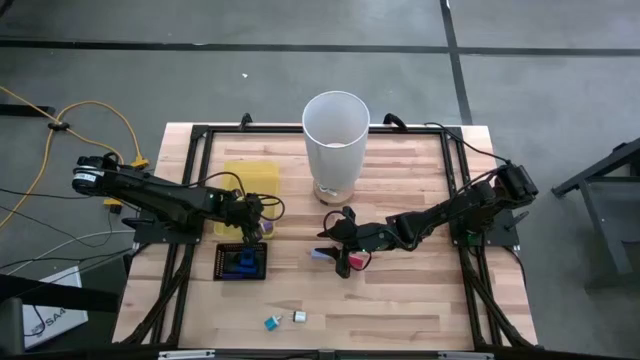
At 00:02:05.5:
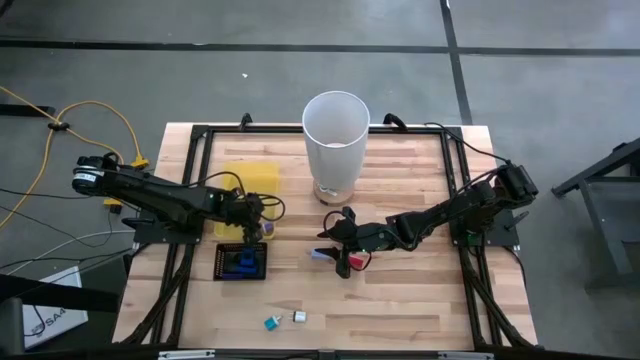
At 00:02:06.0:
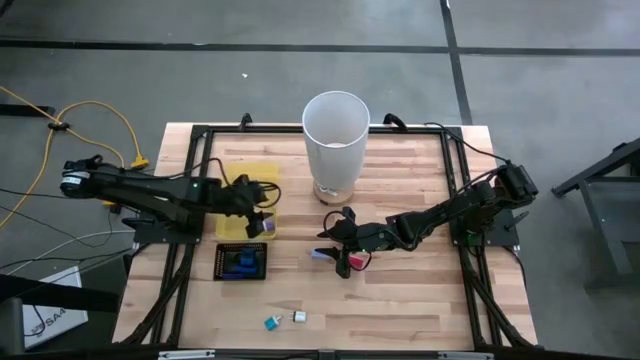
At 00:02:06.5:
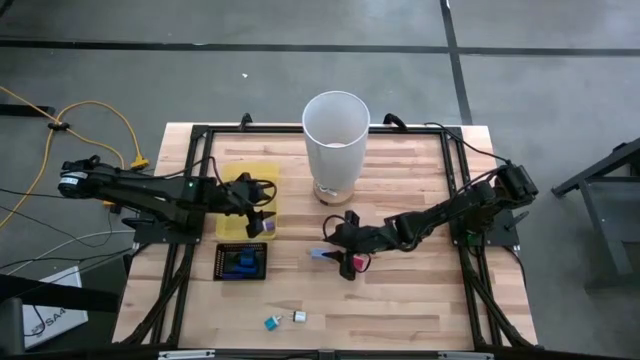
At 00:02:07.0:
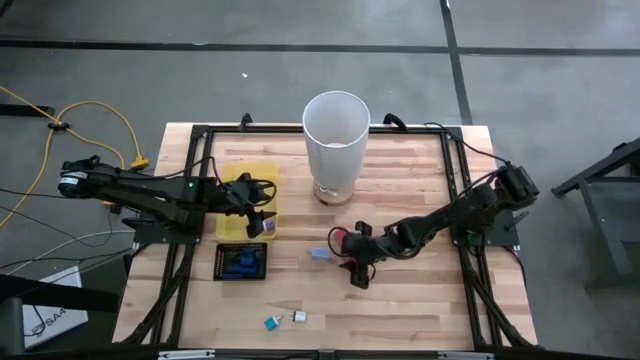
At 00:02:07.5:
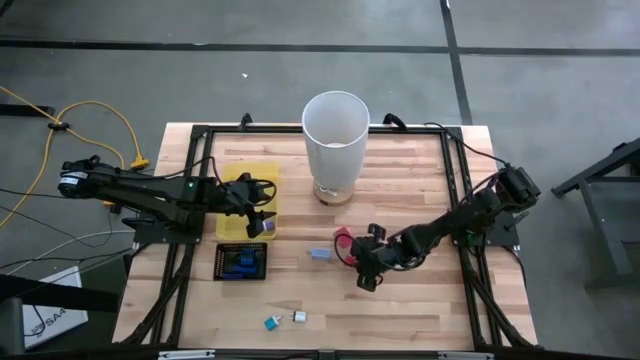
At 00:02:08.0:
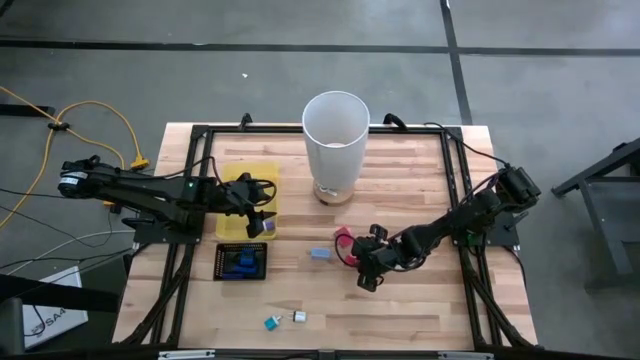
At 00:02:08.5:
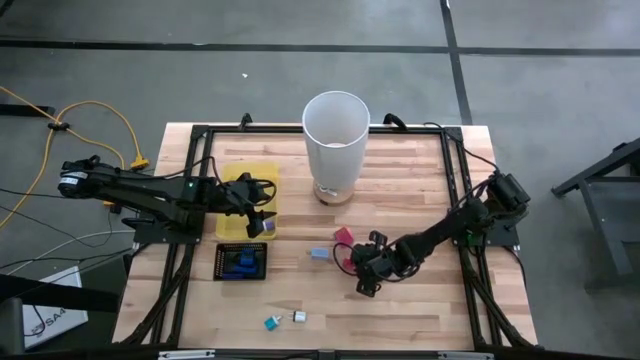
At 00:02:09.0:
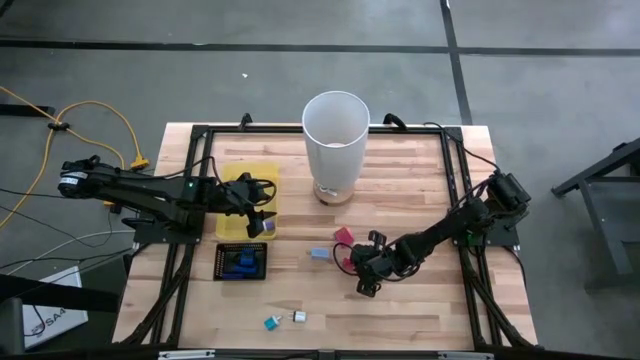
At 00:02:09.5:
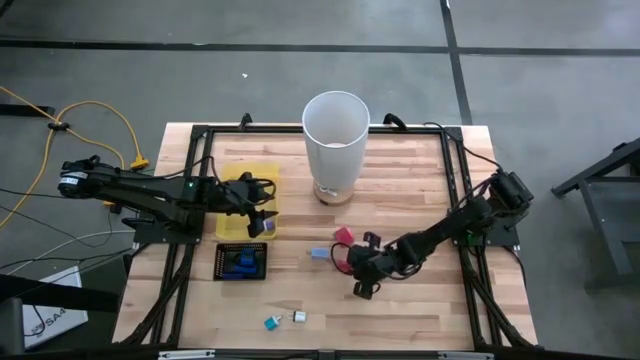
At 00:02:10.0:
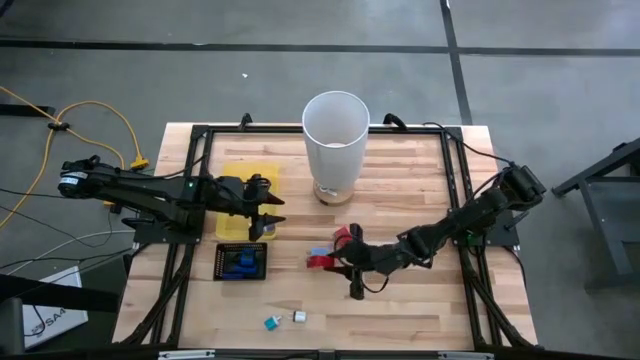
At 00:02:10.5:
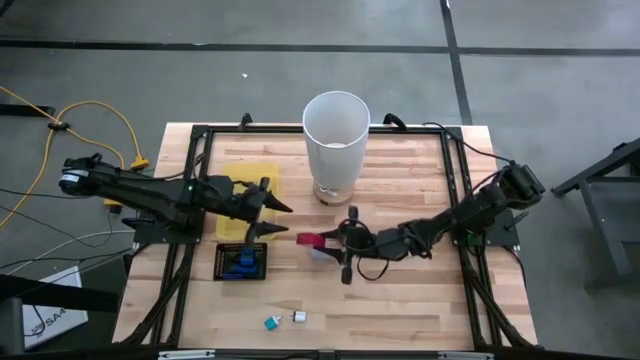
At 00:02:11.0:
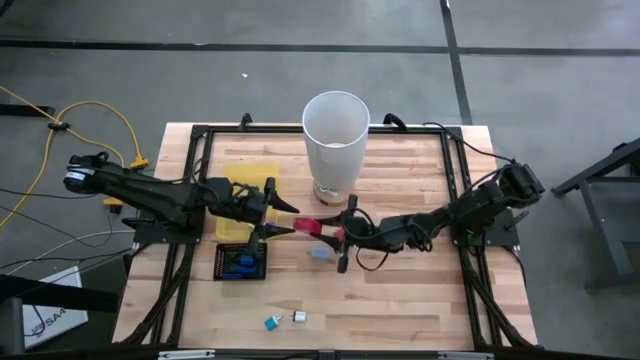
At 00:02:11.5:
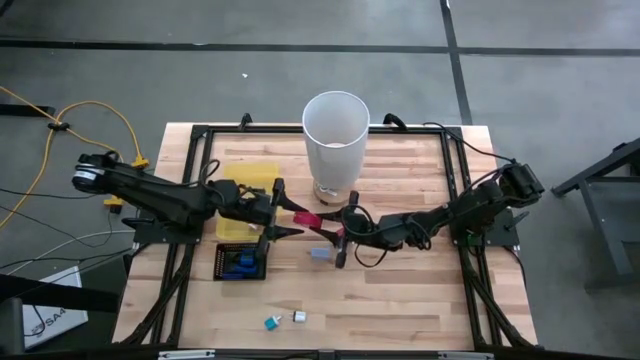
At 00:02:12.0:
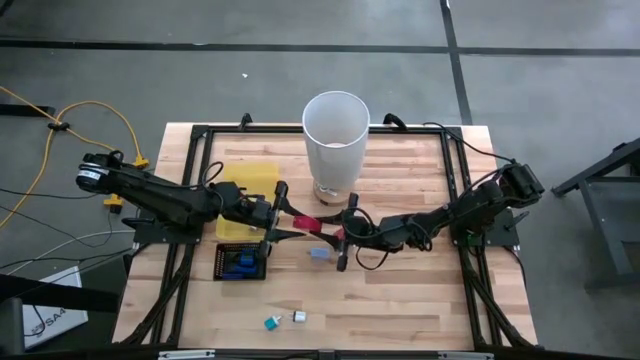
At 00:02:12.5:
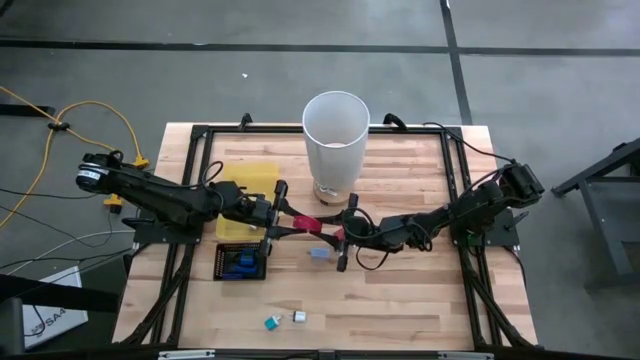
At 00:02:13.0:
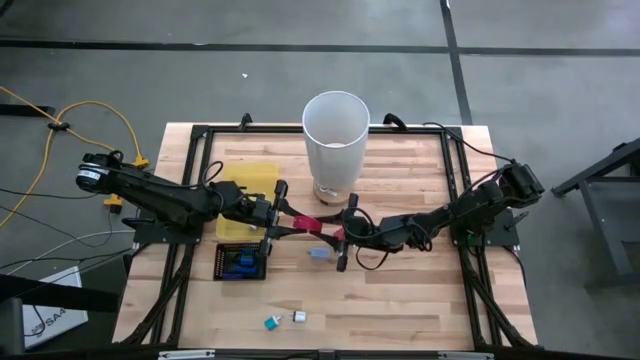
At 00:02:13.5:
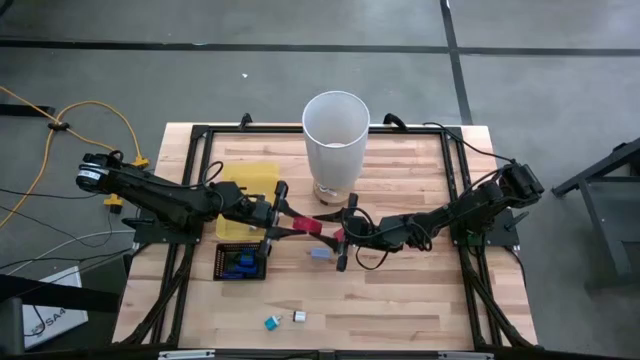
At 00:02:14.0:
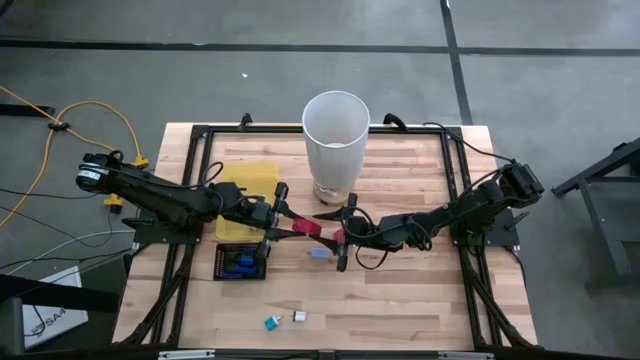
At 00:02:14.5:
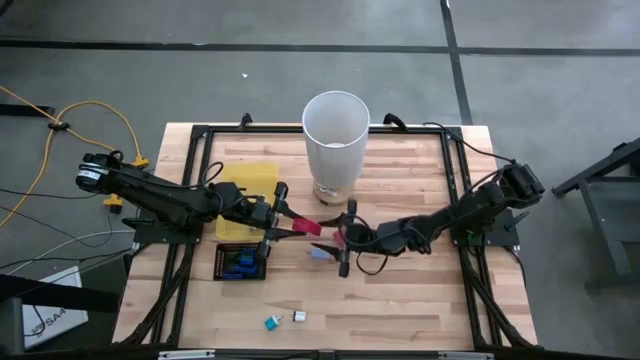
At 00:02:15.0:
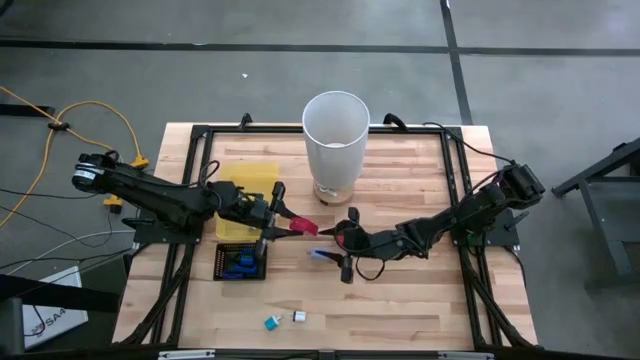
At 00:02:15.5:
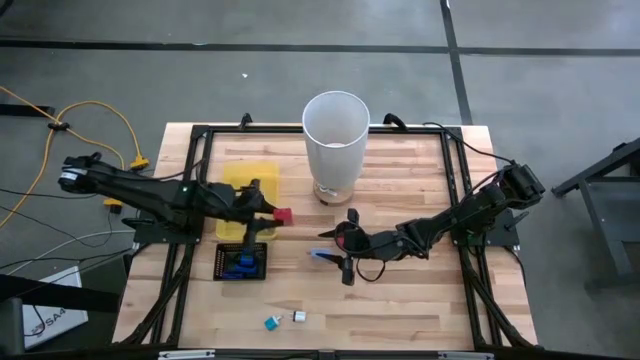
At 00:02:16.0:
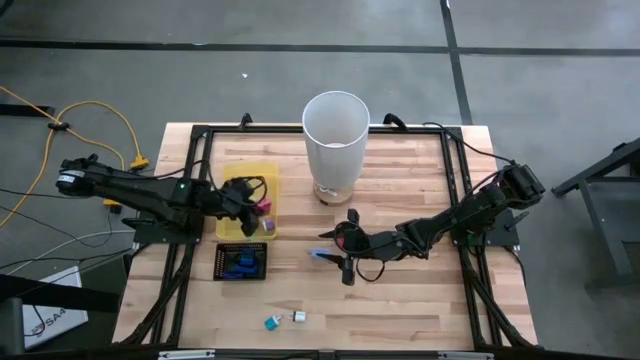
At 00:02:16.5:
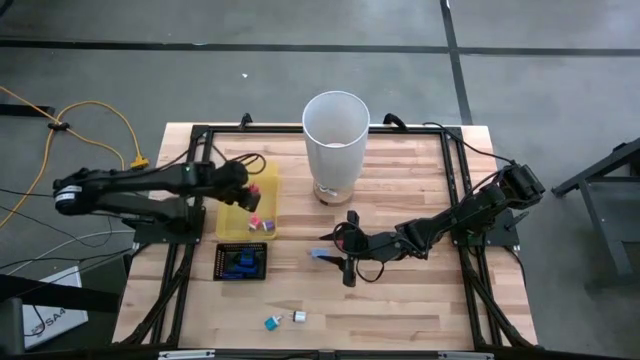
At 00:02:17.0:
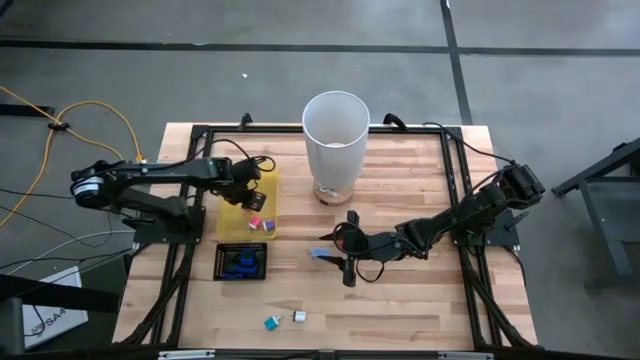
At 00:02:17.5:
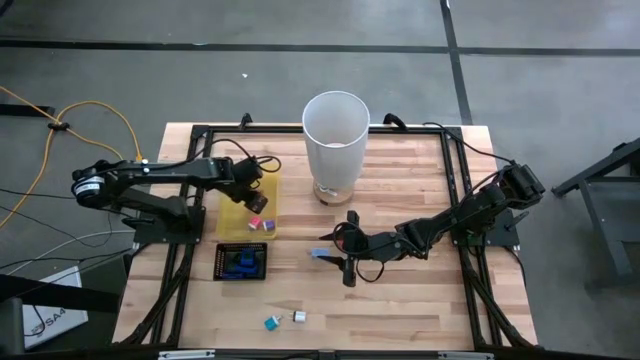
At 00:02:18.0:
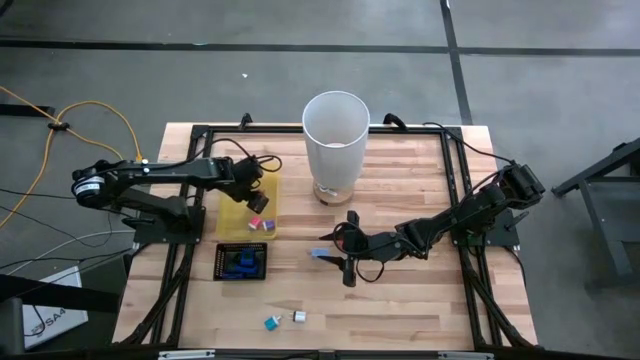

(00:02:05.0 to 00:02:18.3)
Task: Pick & Place Office items
Put the bottom red charger into the yellow bin

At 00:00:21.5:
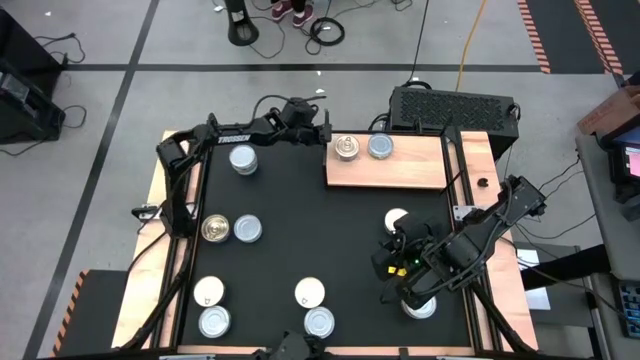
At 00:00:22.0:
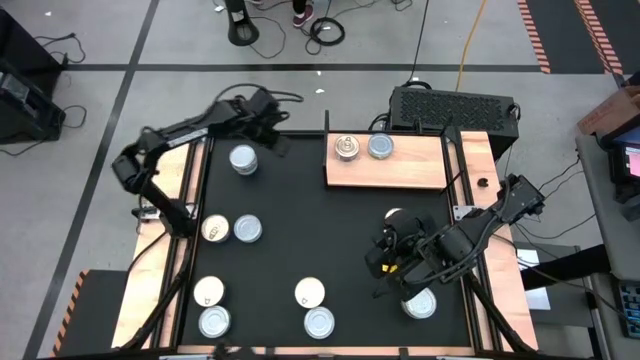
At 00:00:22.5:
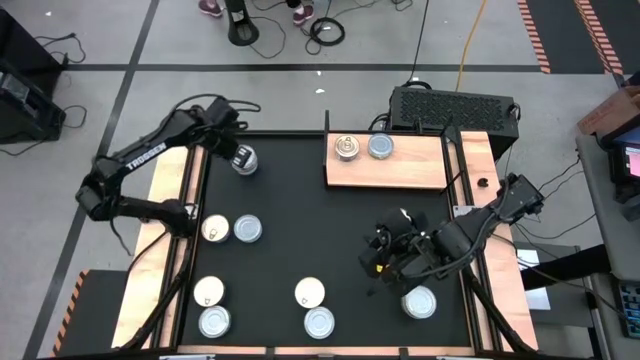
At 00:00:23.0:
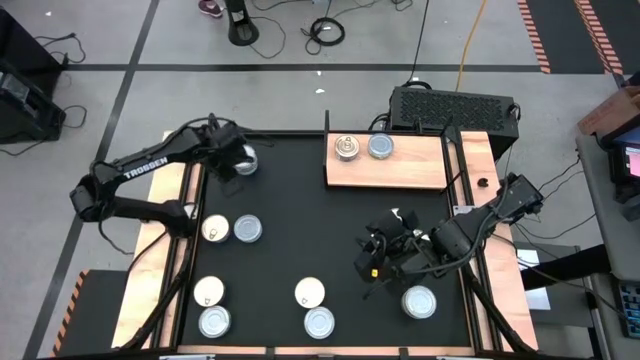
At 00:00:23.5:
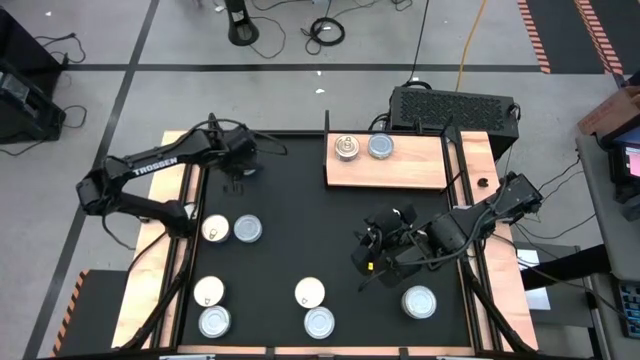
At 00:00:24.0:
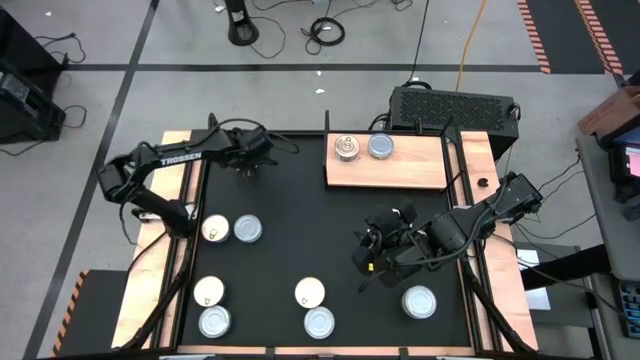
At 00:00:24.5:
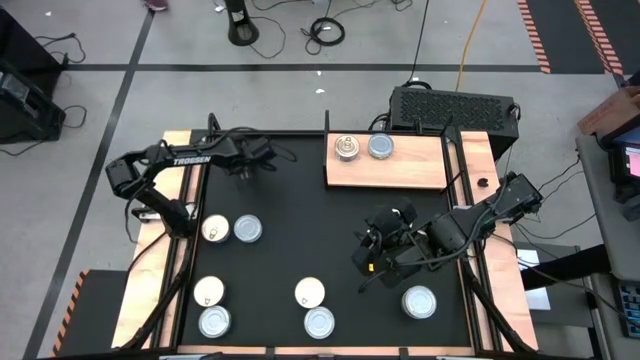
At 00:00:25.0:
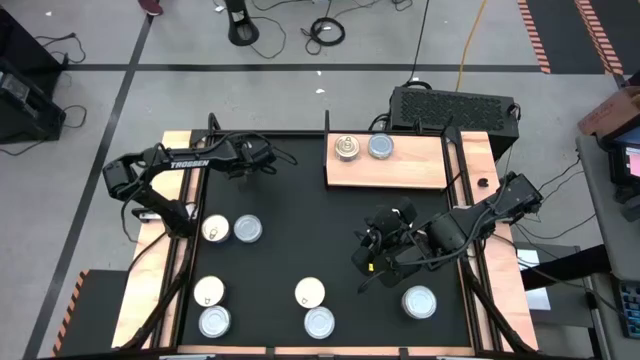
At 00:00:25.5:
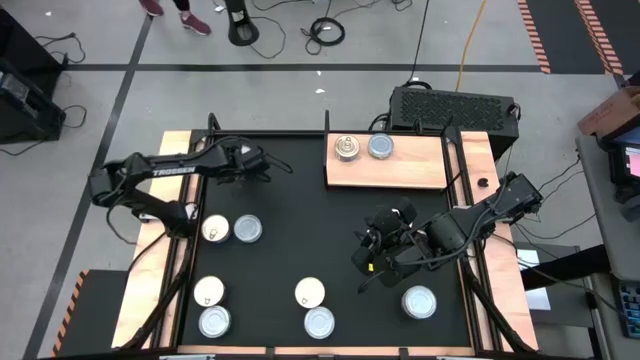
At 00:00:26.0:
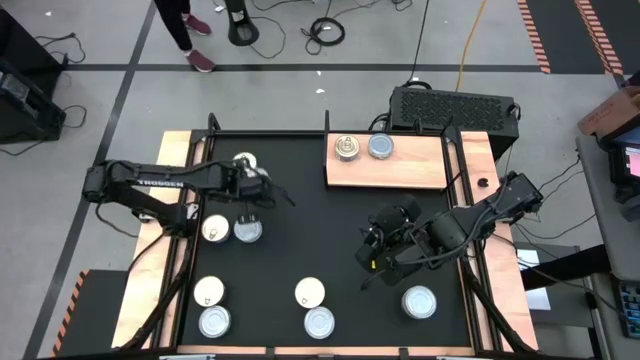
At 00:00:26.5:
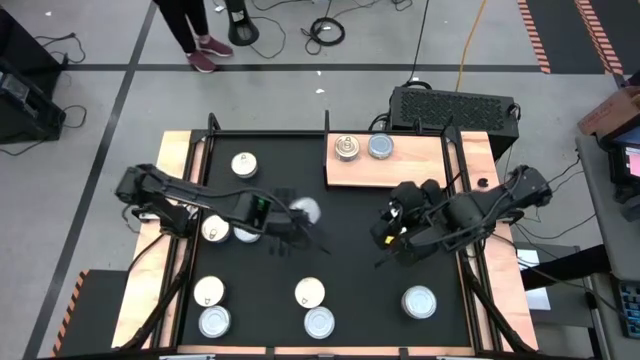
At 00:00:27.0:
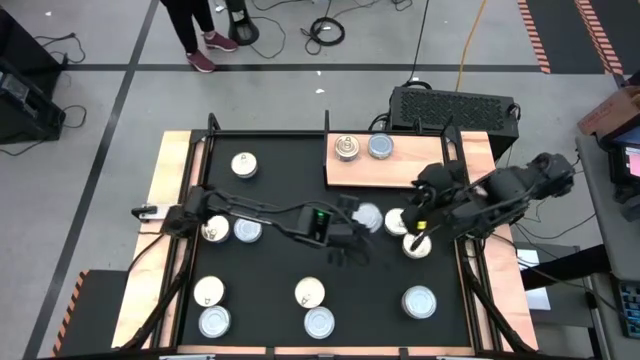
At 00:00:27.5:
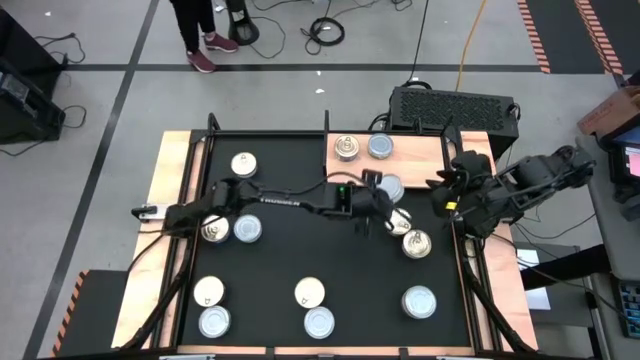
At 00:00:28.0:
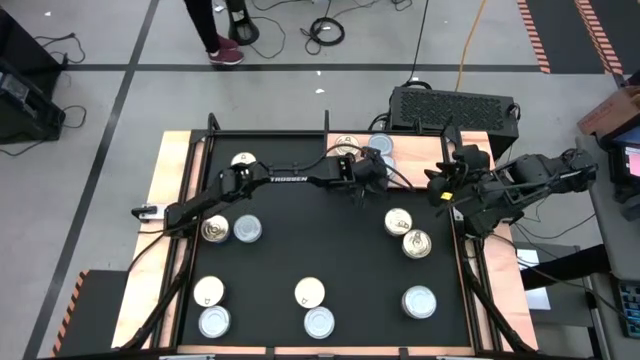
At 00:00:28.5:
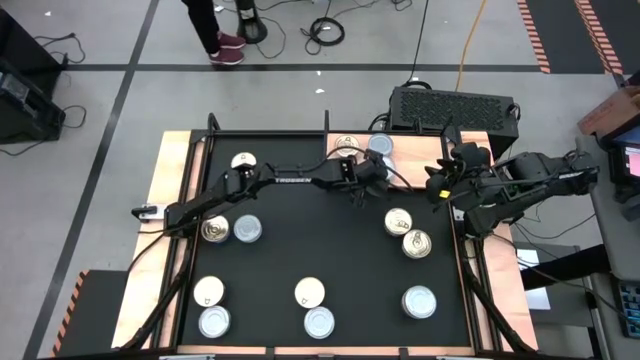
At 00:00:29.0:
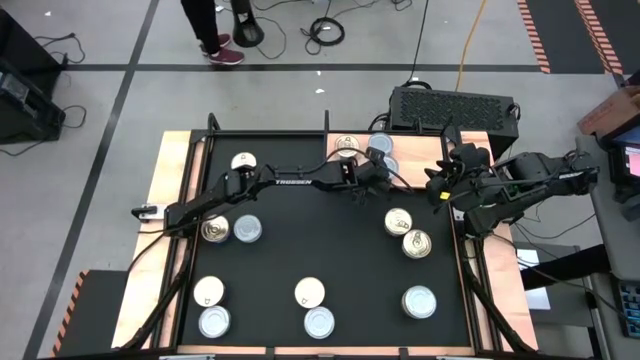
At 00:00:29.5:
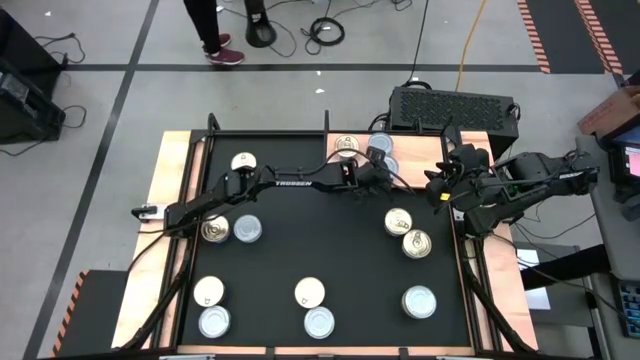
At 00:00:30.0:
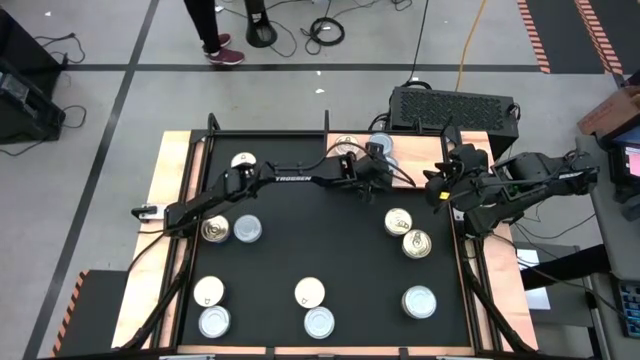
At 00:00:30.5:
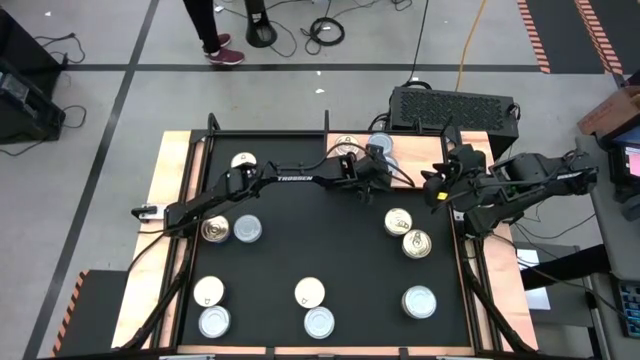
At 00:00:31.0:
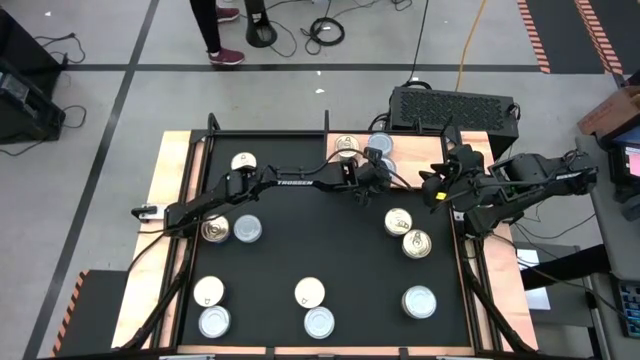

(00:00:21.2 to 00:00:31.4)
Task: Stack canned seafood by type on shelf
Put the green tuna can on the shelf aligned with the other green tuna can
